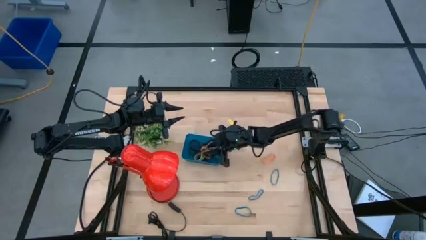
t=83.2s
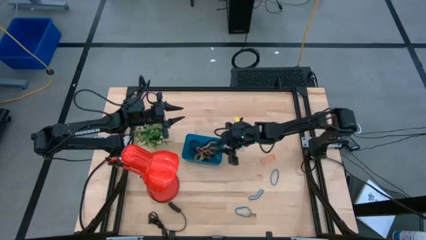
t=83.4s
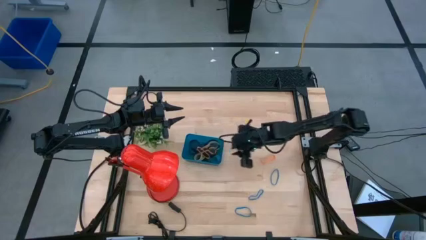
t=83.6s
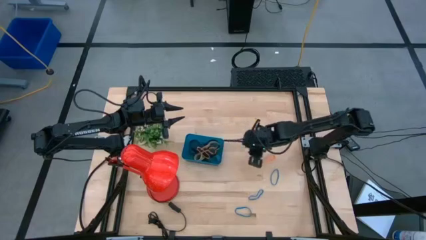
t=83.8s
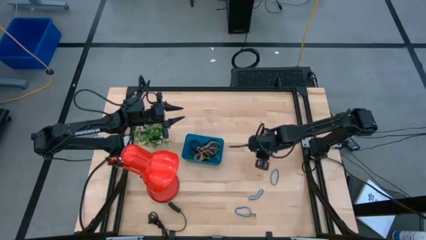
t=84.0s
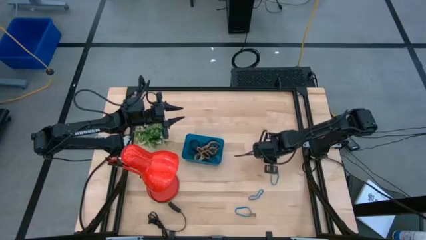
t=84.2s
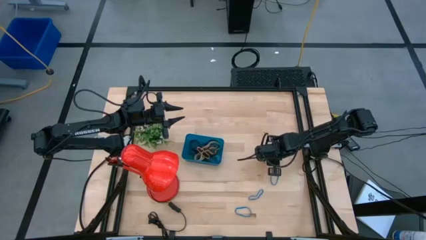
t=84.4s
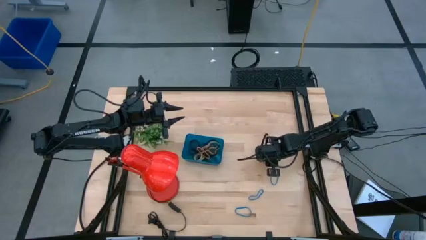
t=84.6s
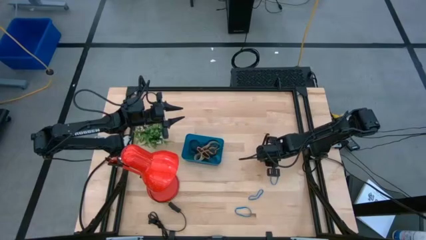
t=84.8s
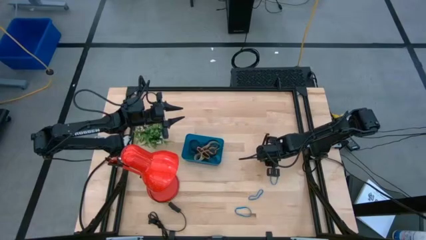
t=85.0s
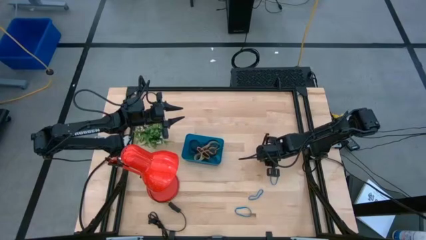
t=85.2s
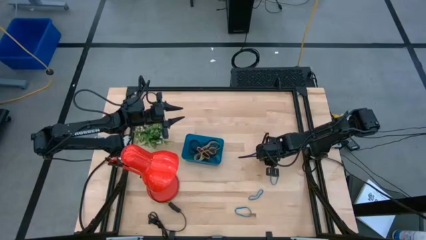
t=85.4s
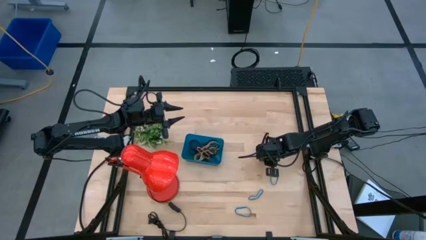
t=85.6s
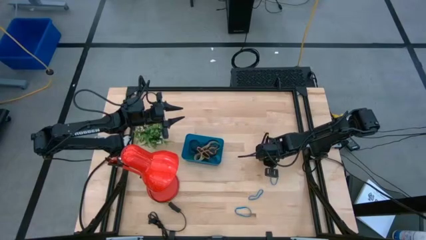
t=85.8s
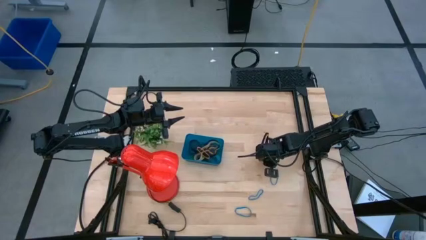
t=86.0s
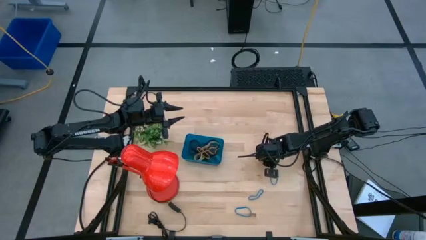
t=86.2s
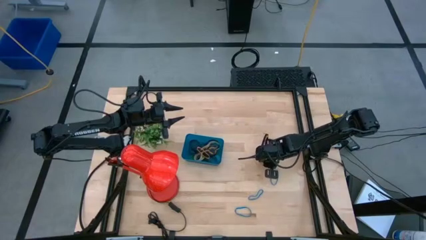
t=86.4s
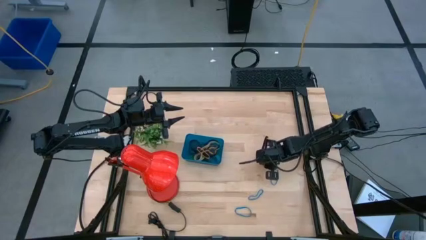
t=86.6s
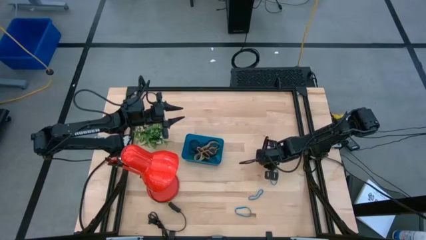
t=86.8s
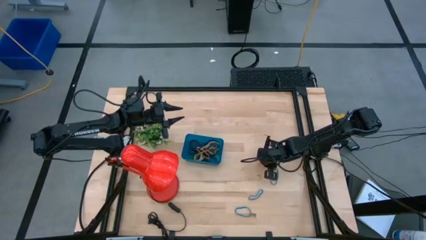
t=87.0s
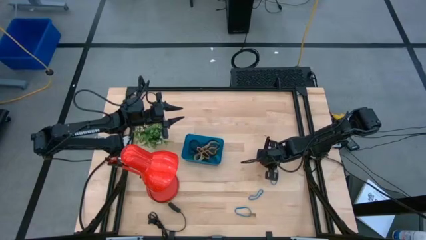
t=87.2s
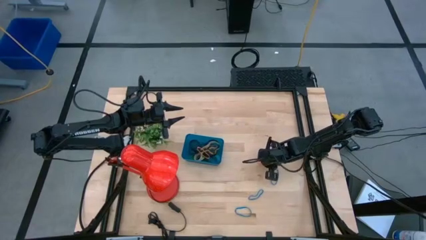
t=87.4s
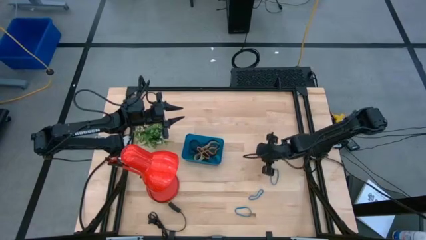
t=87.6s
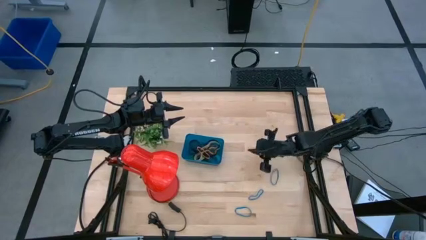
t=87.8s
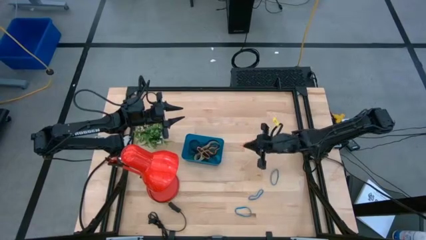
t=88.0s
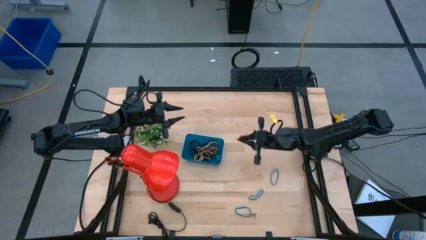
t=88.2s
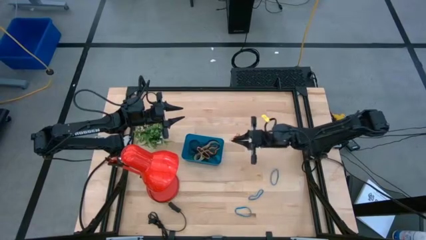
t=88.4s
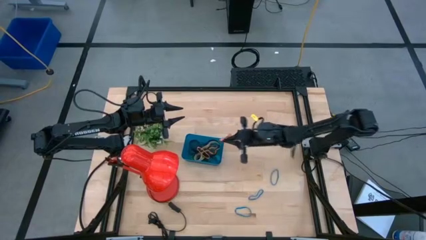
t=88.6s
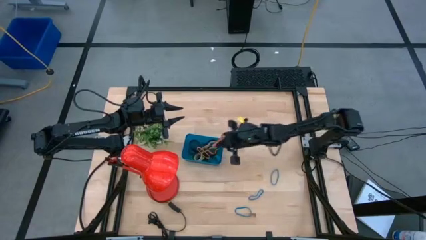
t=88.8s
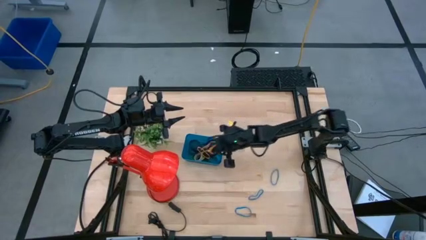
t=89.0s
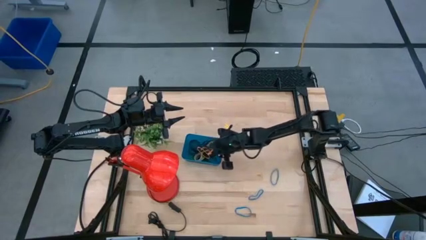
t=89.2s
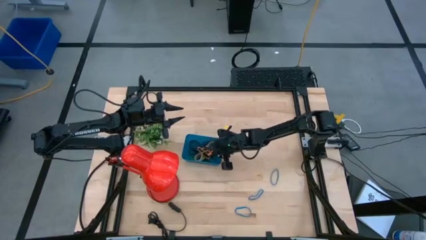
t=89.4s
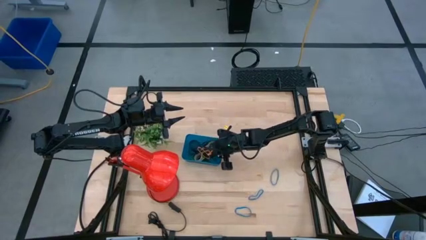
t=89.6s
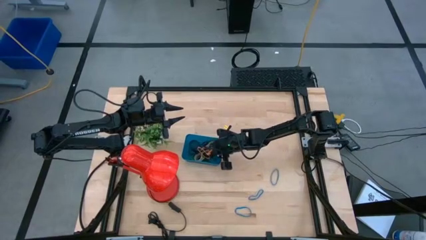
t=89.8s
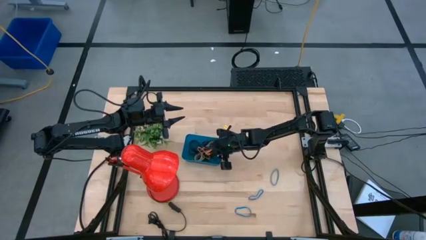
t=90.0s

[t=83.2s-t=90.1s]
Task: Pick and place rubber bands into bin
Put the orange rubber band into the blue bin

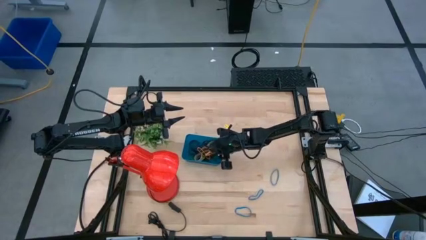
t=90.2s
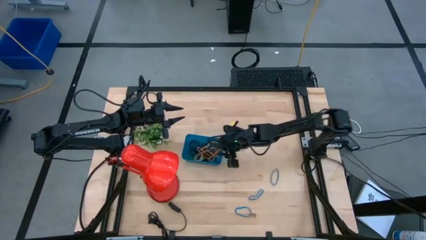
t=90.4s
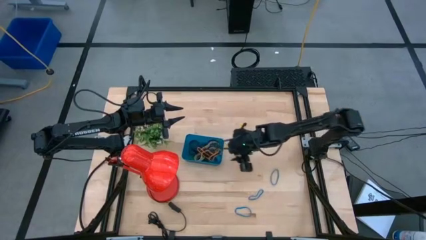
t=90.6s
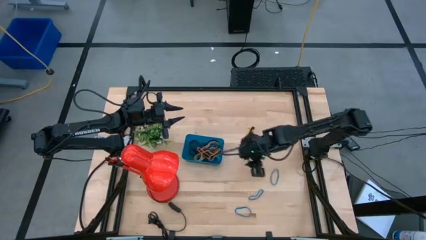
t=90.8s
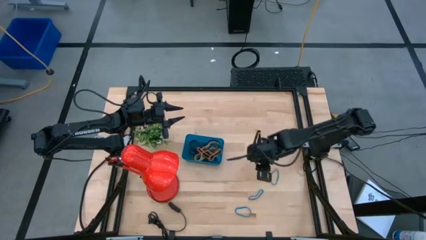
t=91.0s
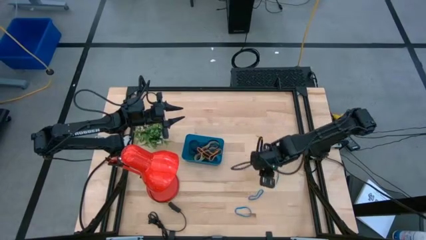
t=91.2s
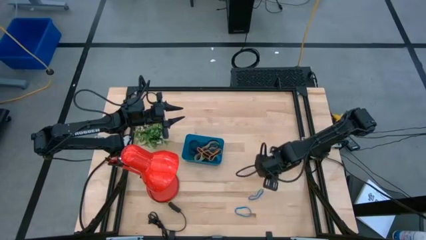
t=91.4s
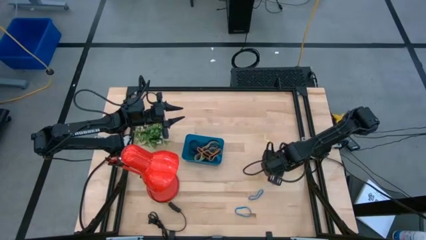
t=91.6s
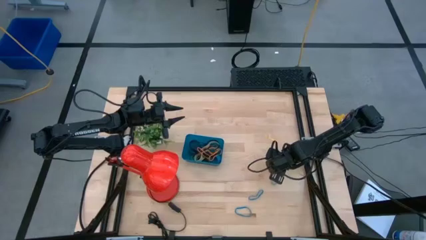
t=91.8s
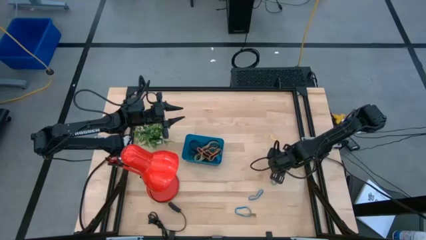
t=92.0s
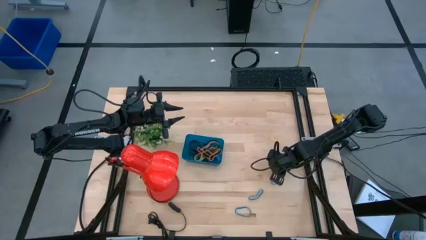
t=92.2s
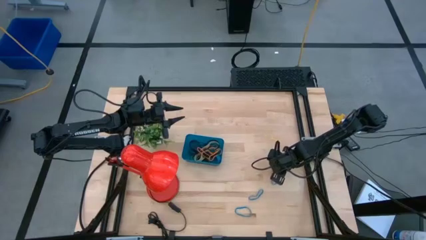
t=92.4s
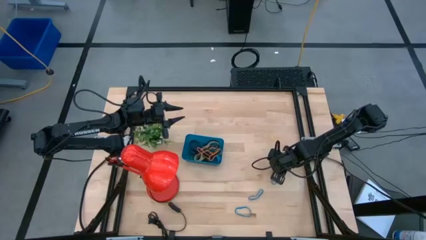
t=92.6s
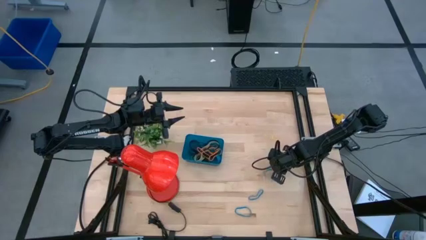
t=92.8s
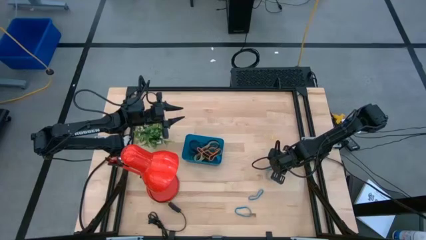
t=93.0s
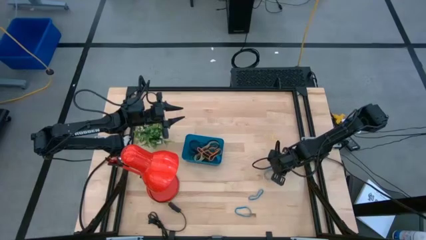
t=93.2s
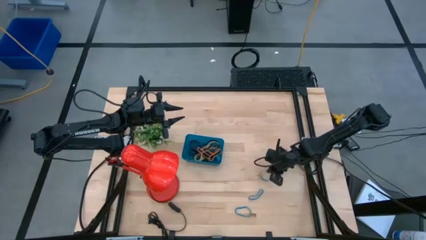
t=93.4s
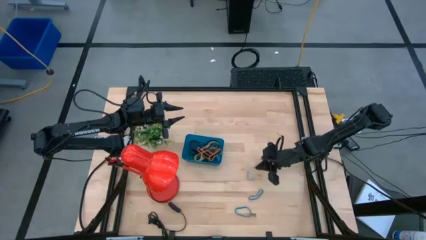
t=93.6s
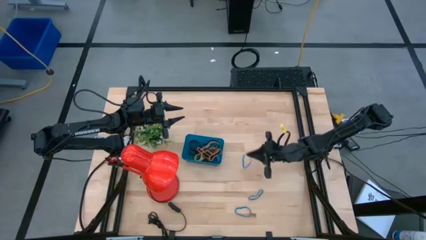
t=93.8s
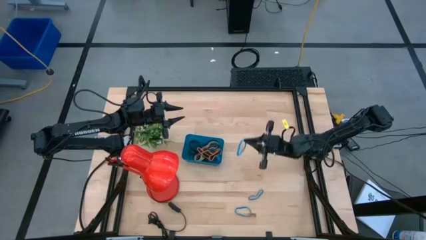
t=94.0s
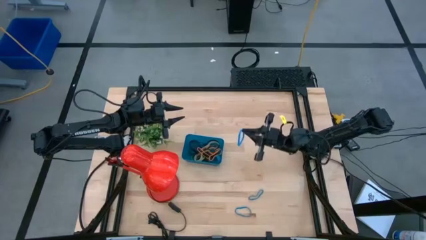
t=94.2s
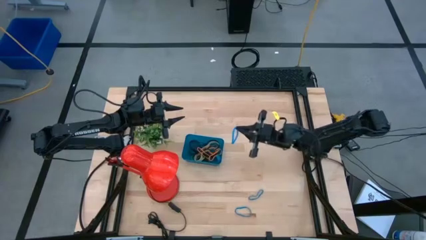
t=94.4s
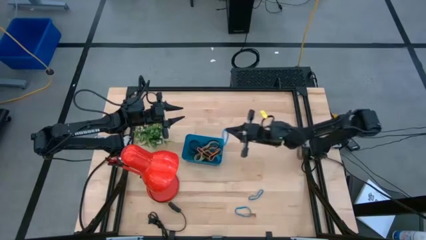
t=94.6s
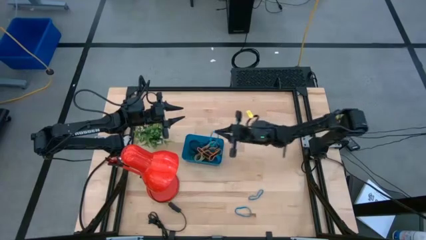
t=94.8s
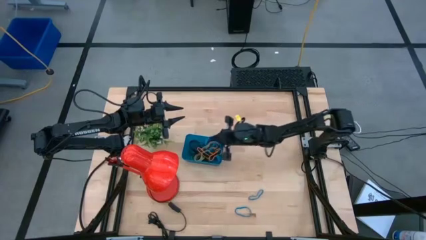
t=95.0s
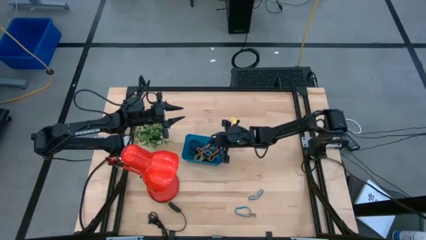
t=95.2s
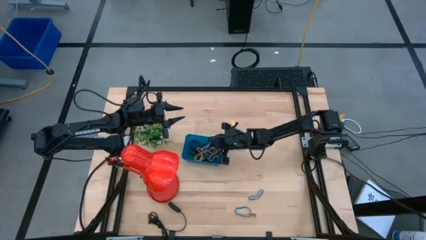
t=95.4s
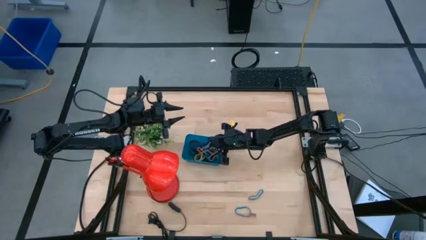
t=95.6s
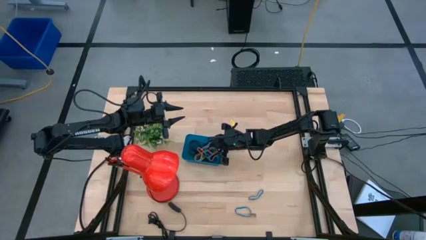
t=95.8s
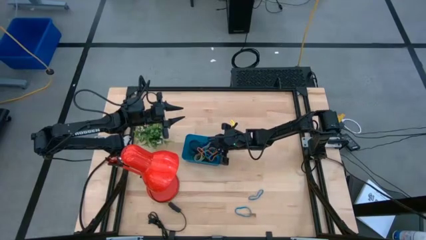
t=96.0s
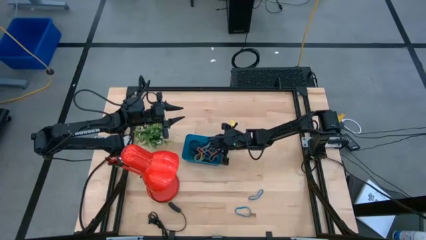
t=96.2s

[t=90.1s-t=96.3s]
Put the blue rubber band into the blue bin

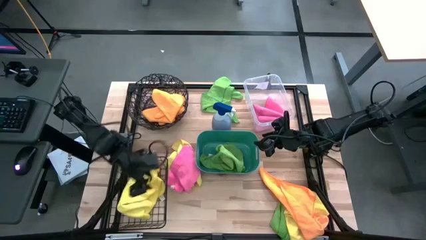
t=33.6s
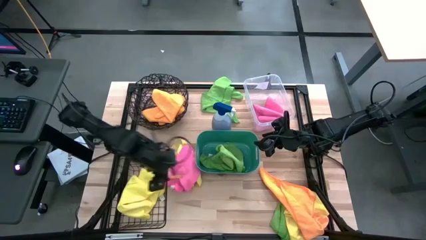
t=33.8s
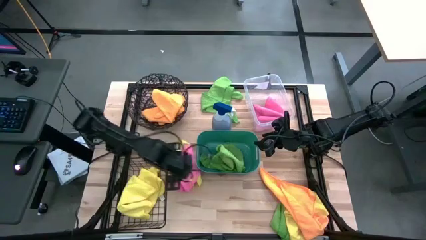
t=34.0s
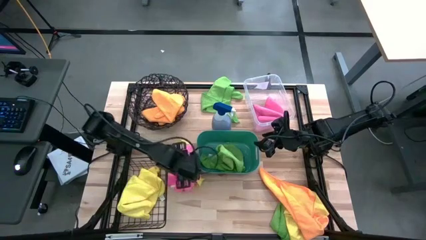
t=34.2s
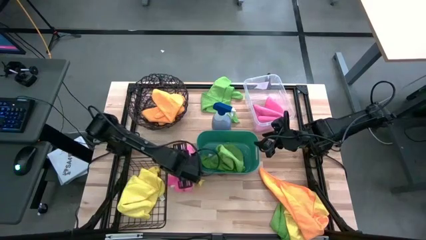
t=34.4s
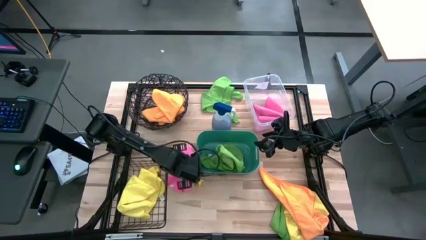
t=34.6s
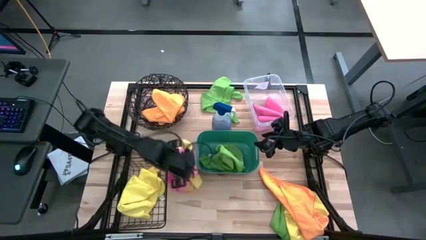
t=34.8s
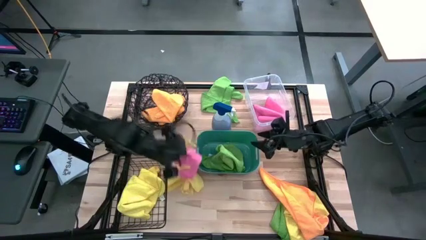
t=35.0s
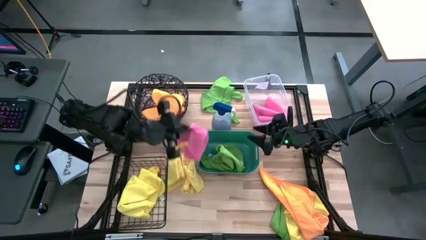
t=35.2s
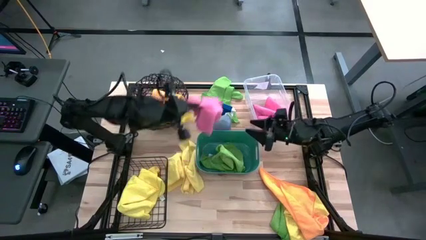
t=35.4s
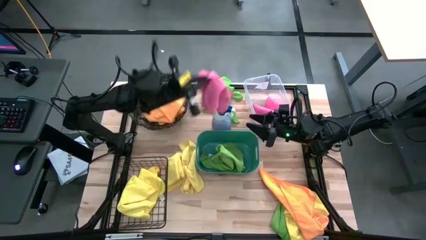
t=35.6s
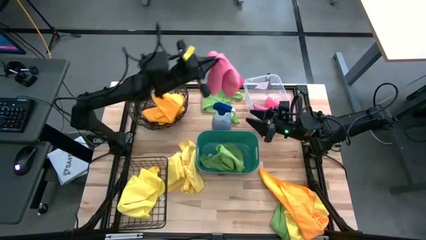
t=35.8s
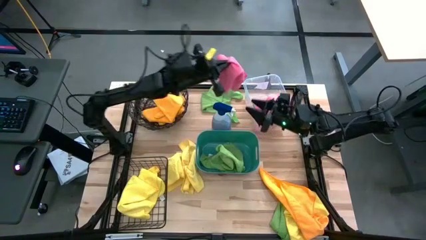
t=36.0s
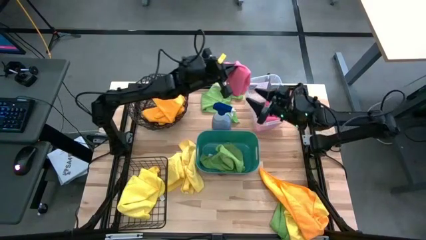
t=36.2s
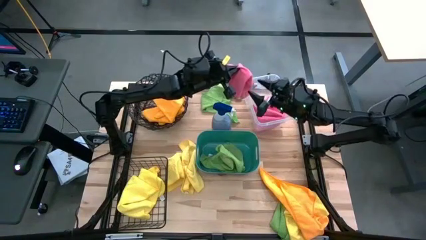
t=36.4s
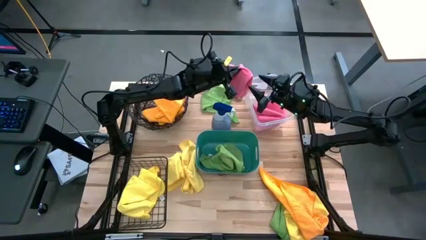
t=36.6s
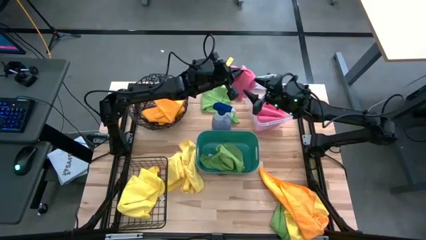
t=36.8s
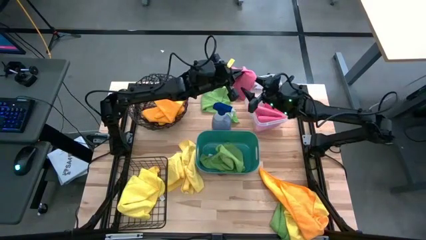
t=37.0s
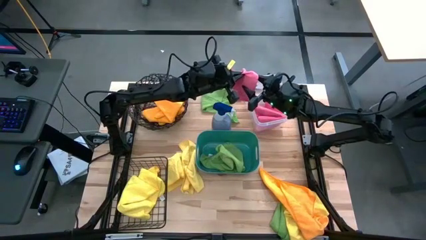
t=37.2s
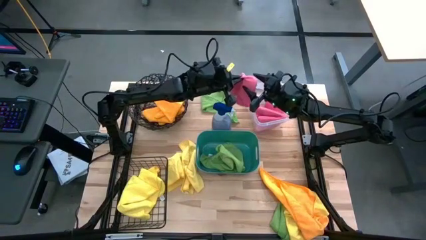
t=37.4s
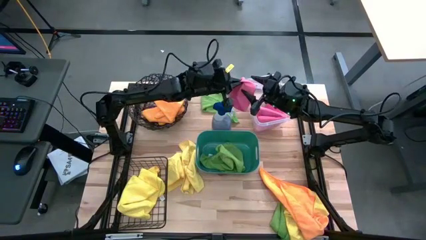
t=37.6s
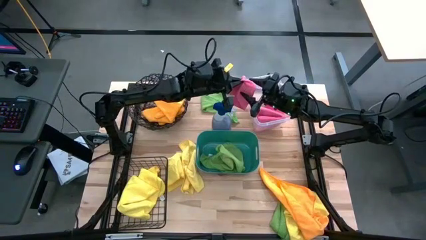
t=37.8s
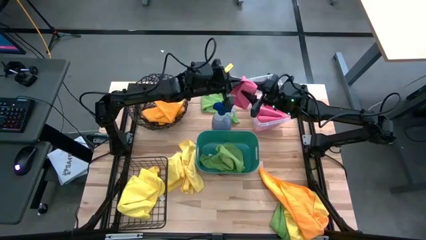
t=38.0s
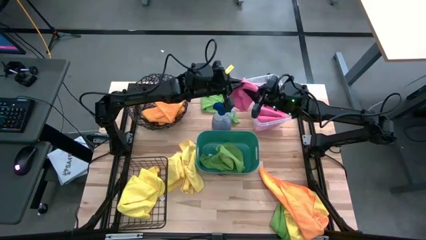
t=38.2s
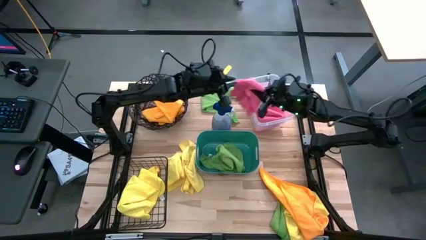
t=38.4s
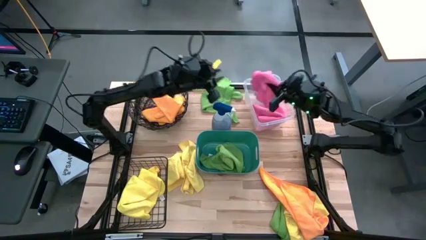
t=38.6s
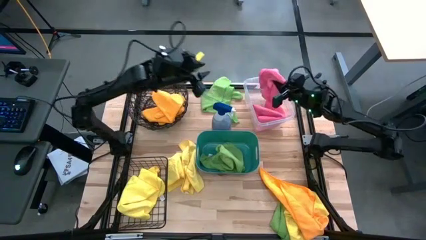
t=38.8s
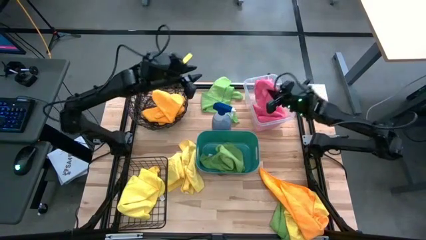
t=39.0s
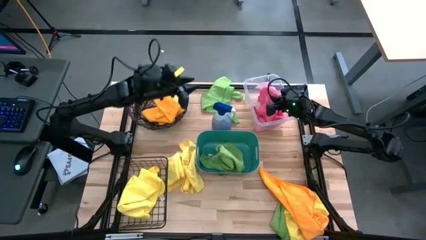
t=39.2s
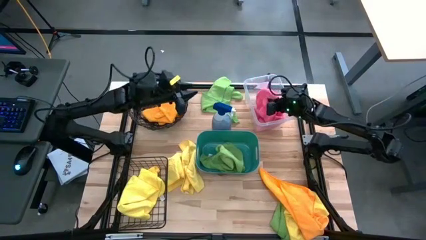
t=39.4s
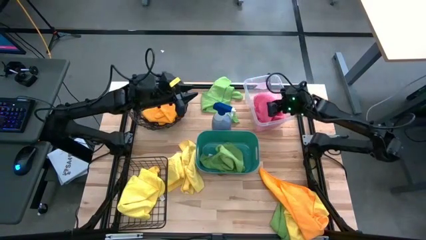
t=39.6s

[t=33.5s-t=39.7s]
Task: Sort microfiber towel by color & place in baskets
Put the pink towel into the transparent bin
